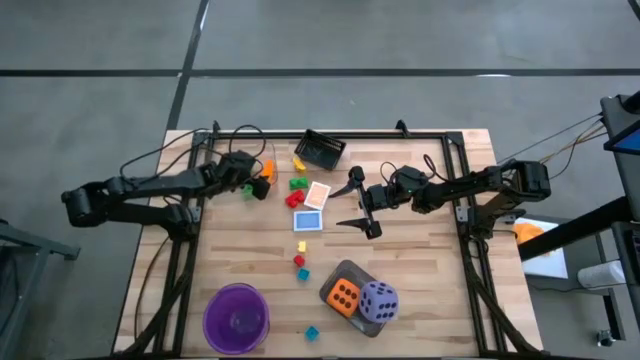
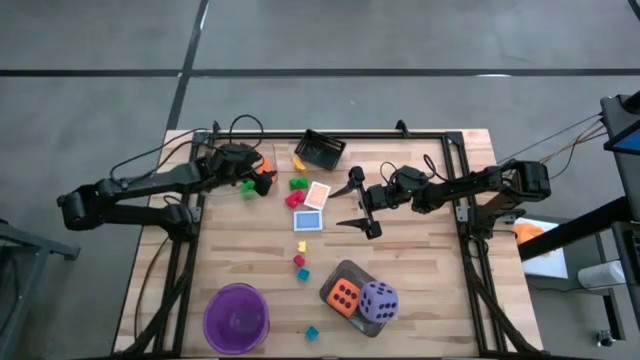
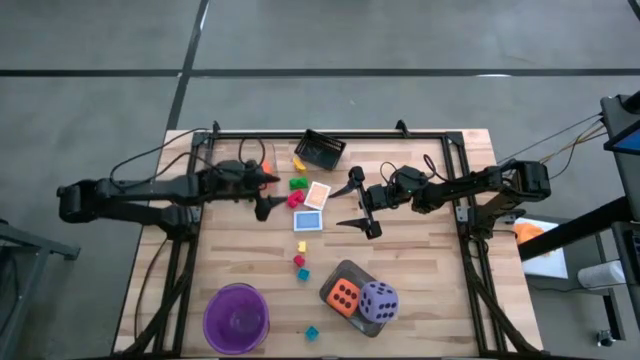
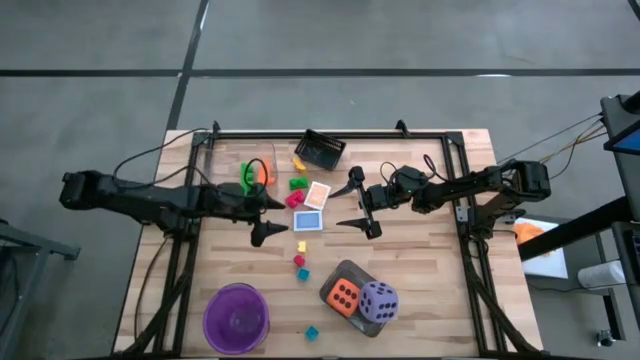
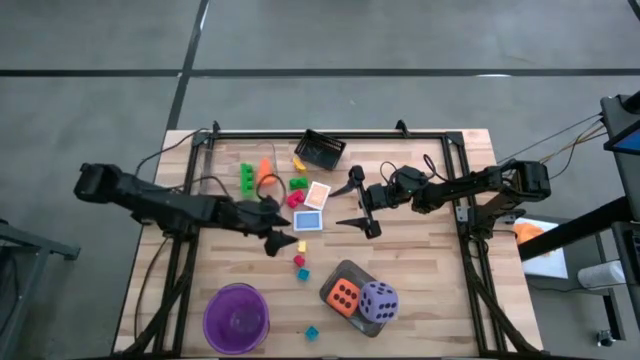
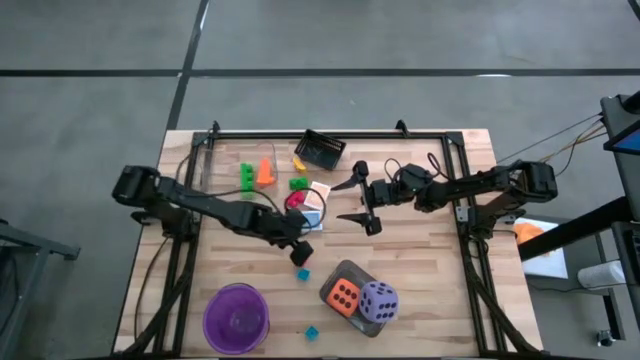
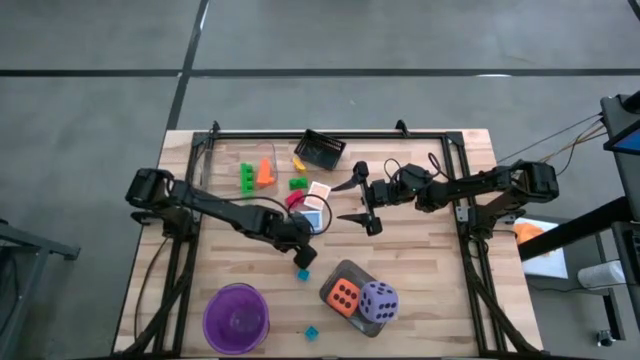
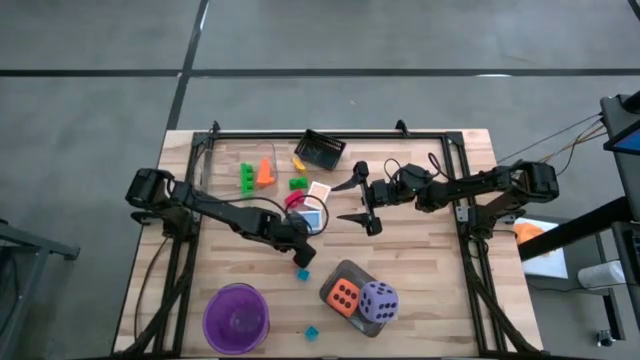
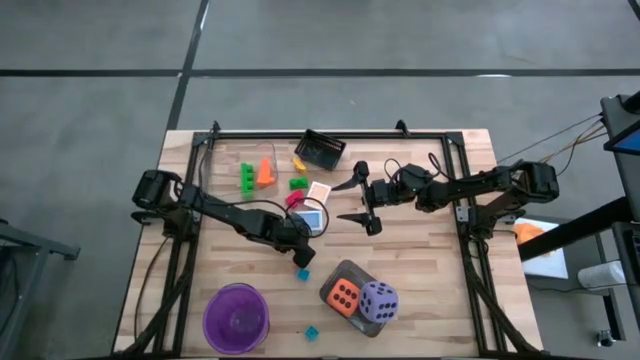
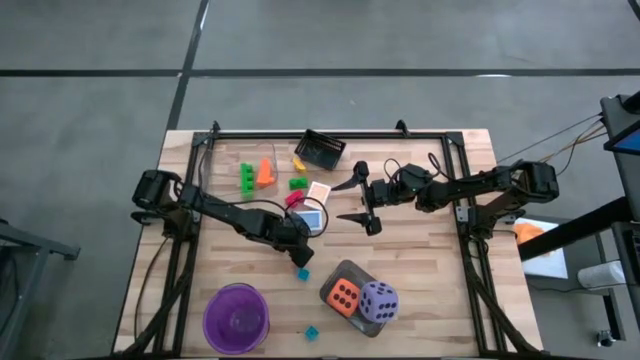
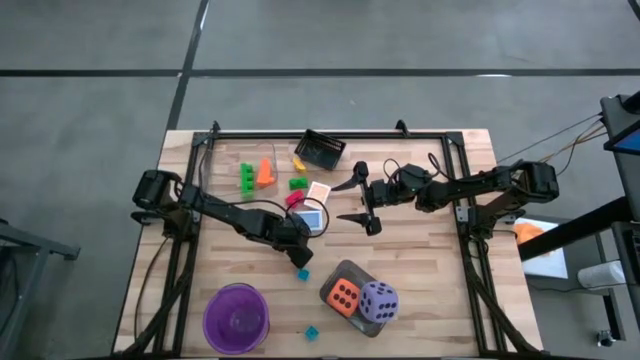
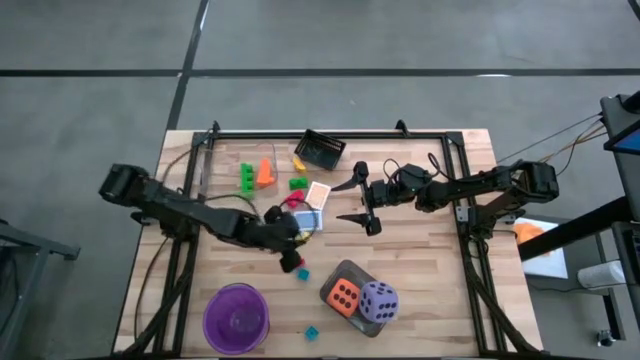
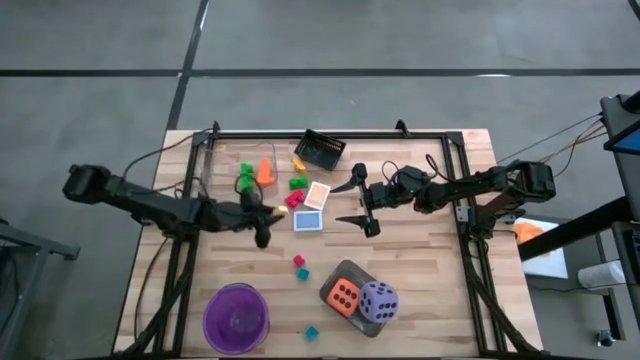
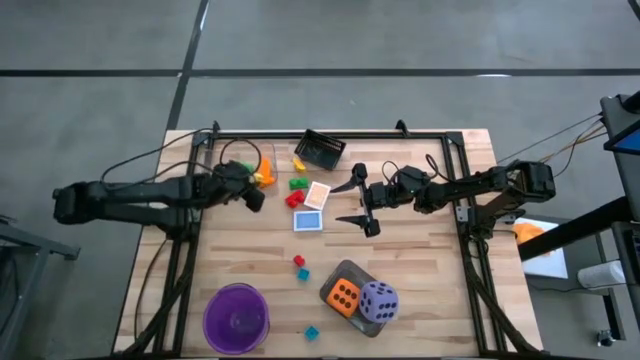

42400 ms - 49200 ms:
Task: Pick & Place Toys
Put the light yellow game piece into the transparent bin

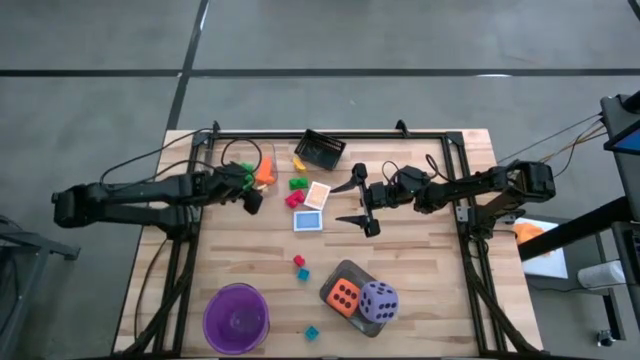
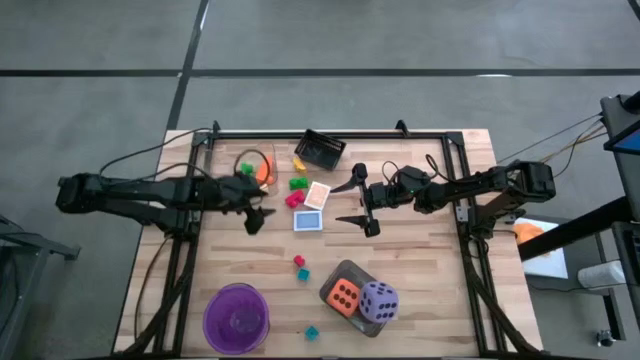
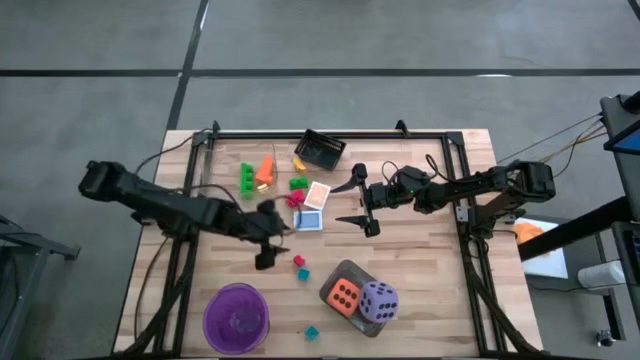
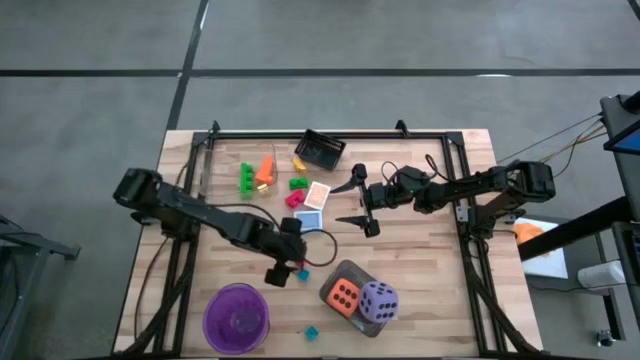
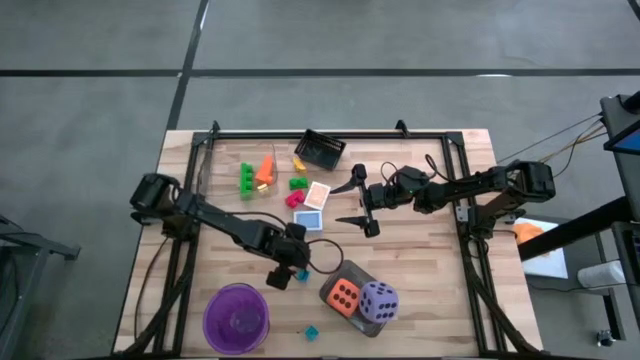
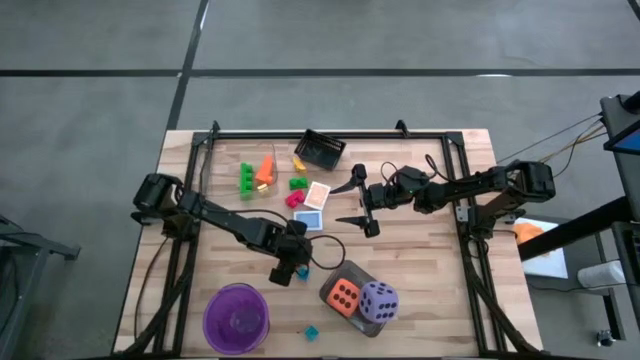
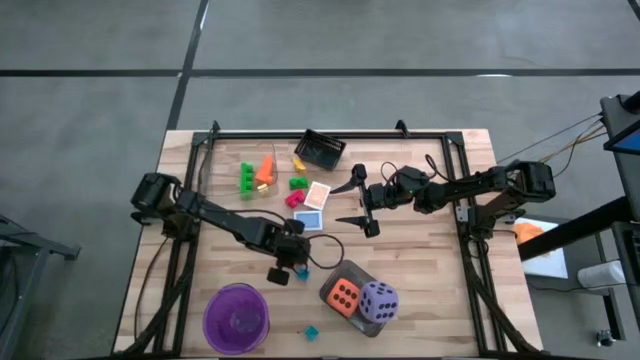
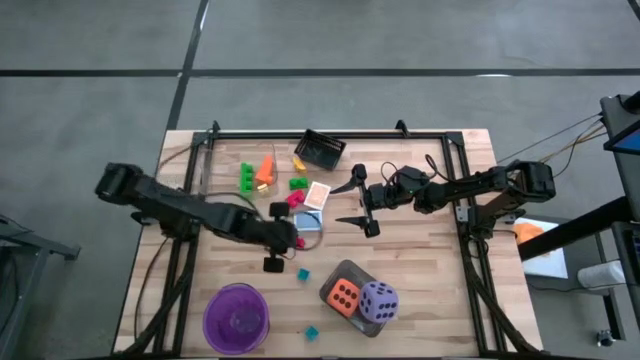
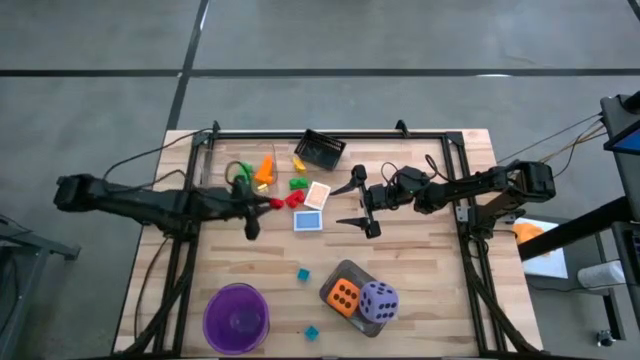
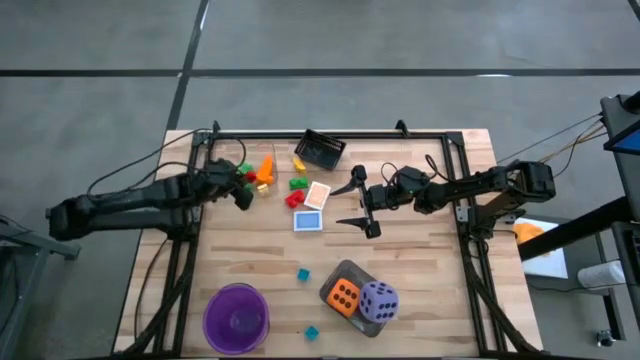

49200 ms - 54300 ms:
Put the bottom red game piece into the transparent bin

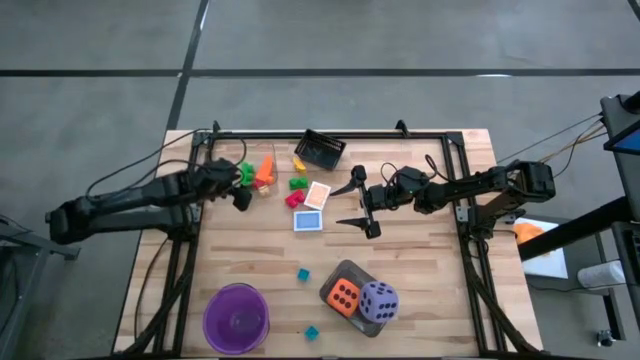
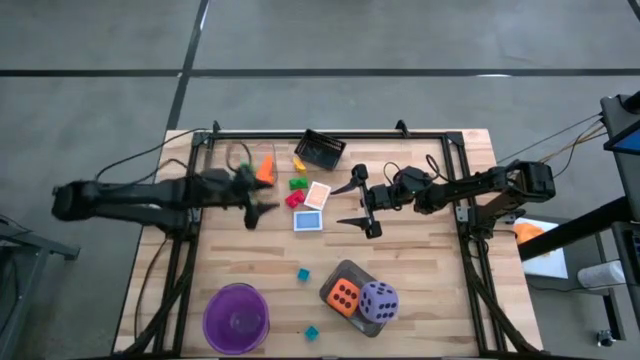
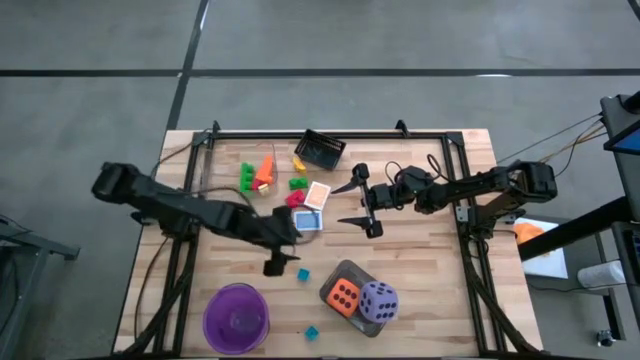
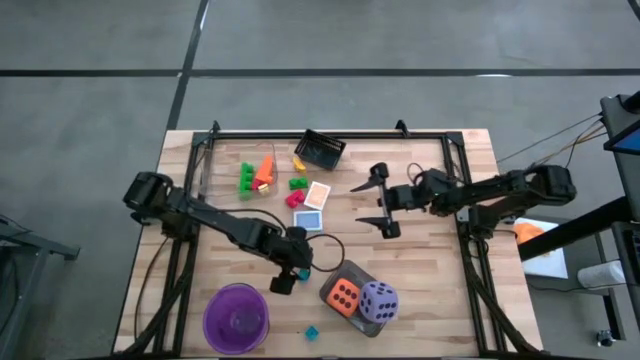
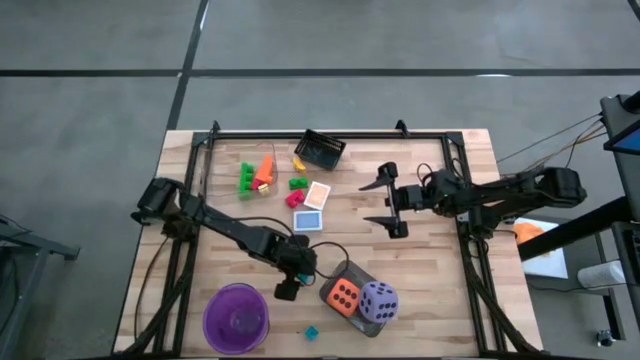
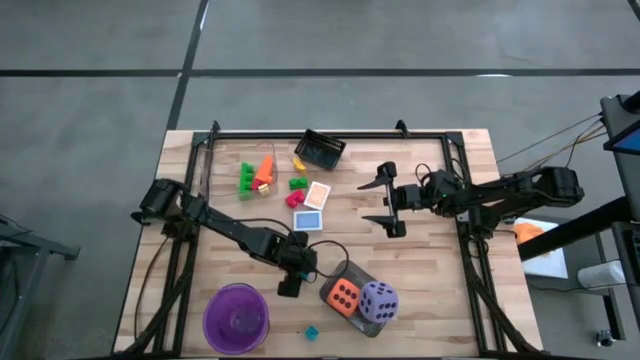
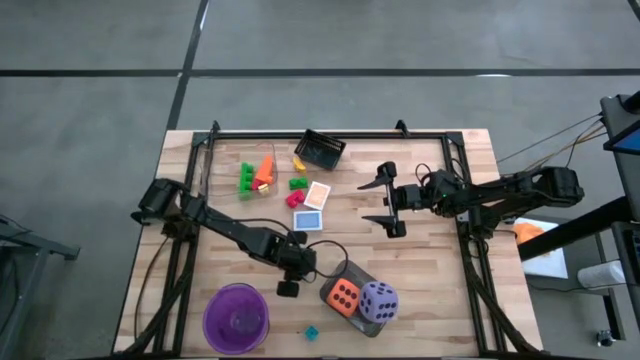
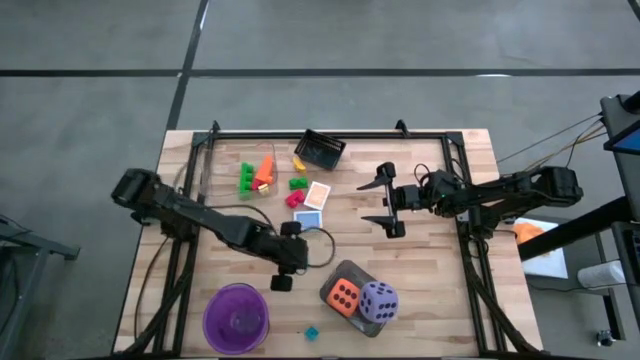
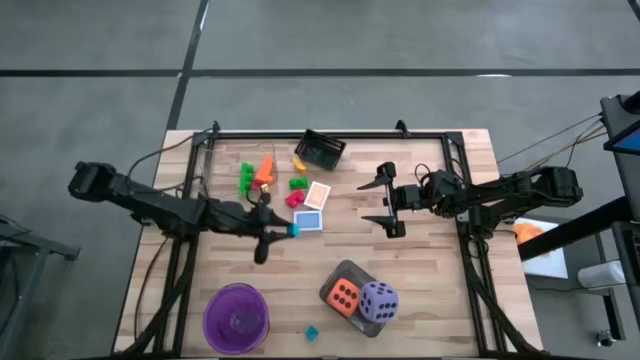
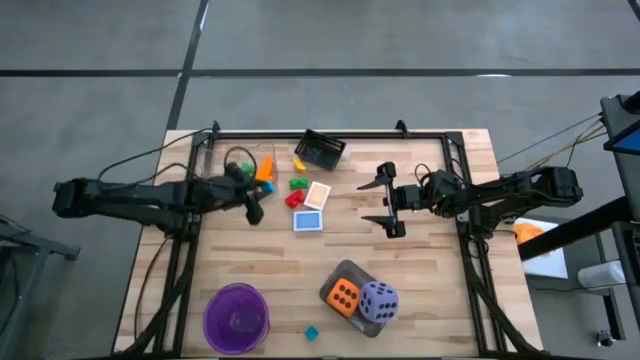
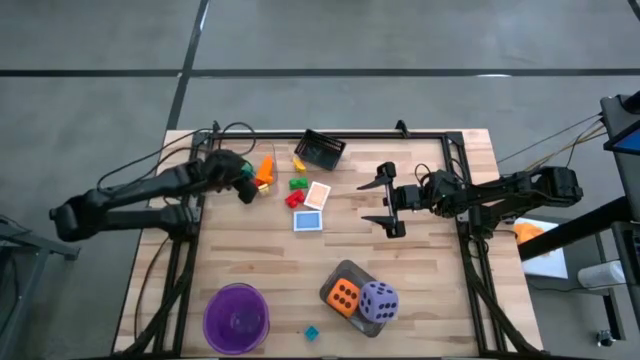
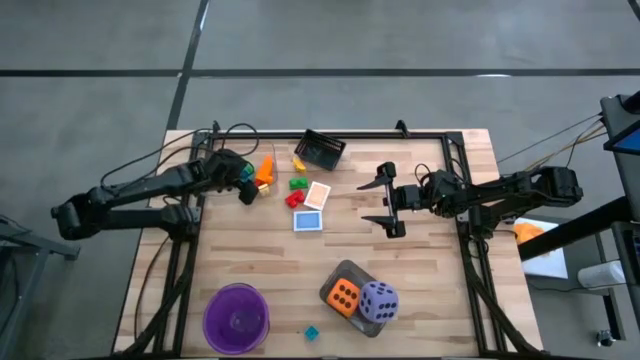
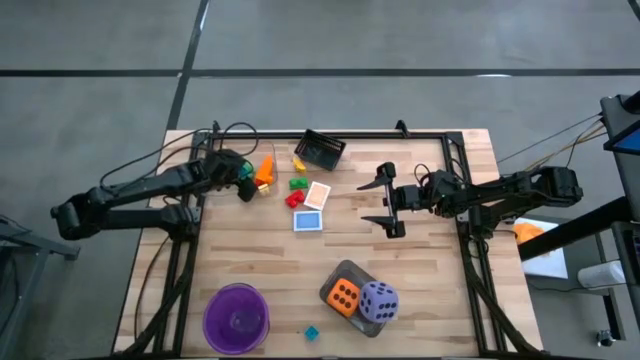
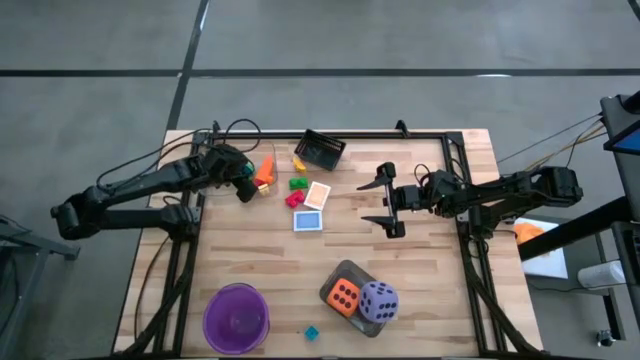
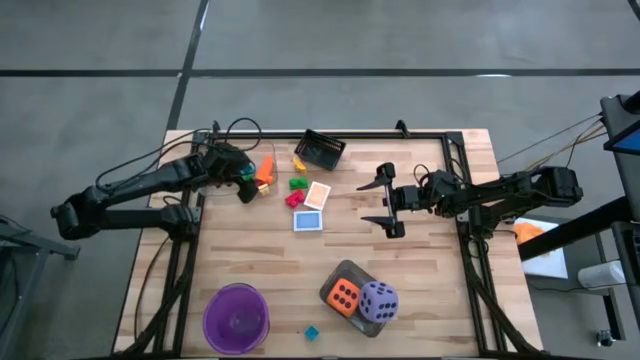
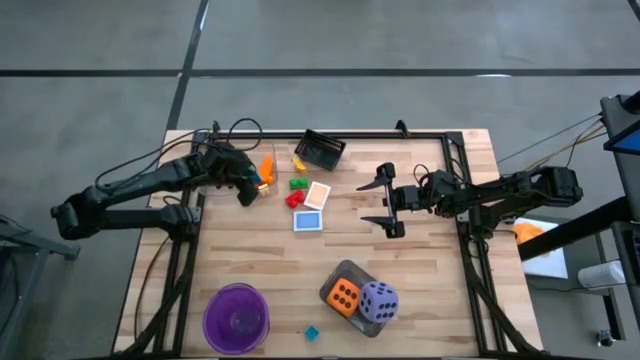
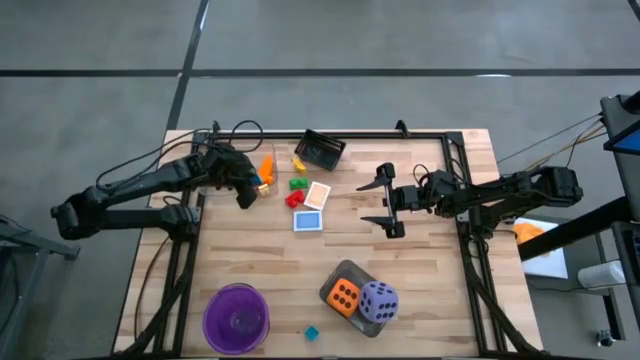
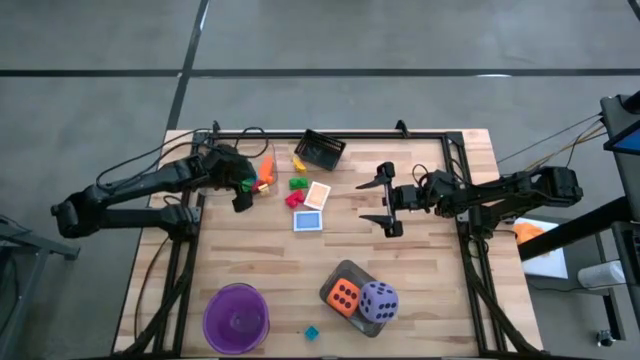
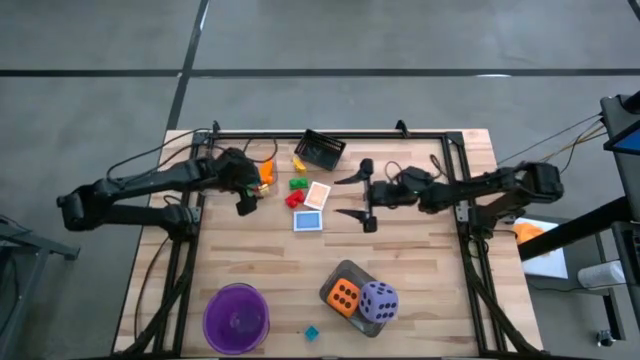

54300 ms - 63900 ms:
Put the top blue game piece into the transparent bin
